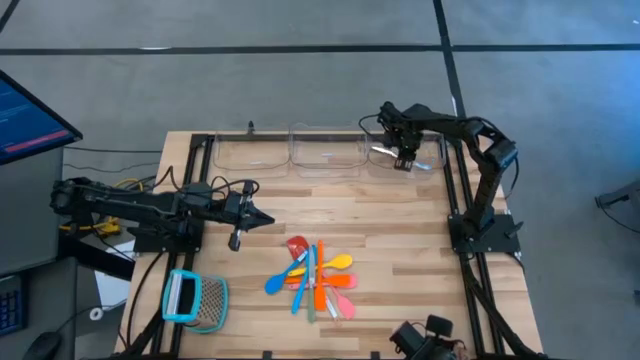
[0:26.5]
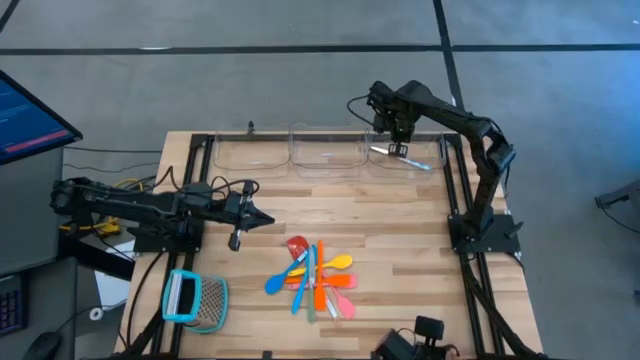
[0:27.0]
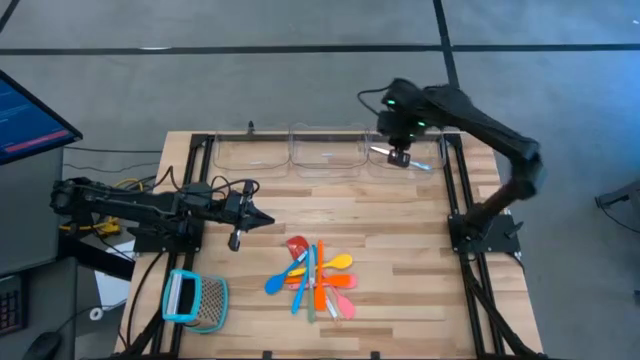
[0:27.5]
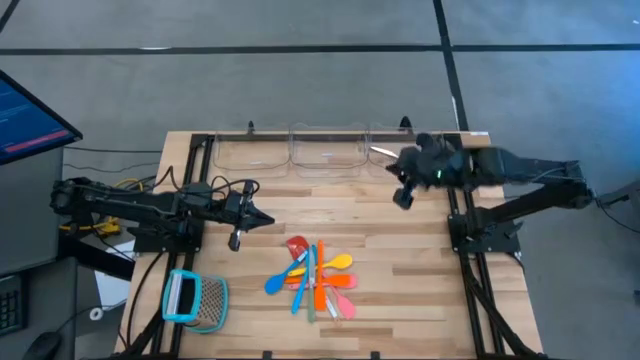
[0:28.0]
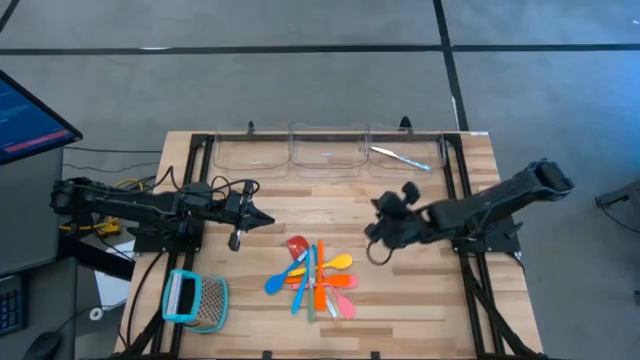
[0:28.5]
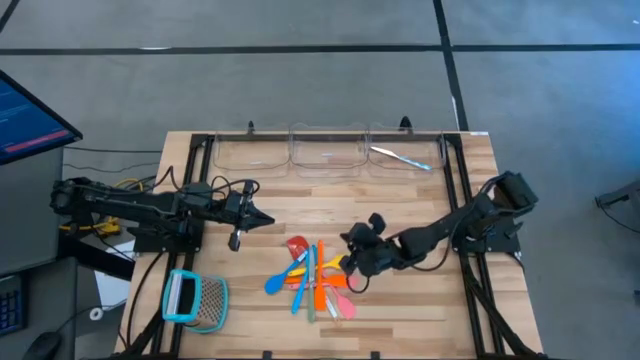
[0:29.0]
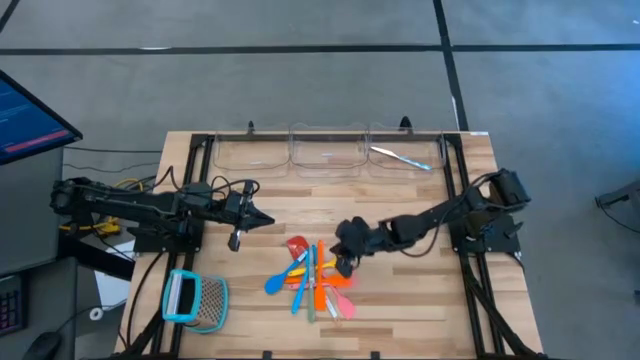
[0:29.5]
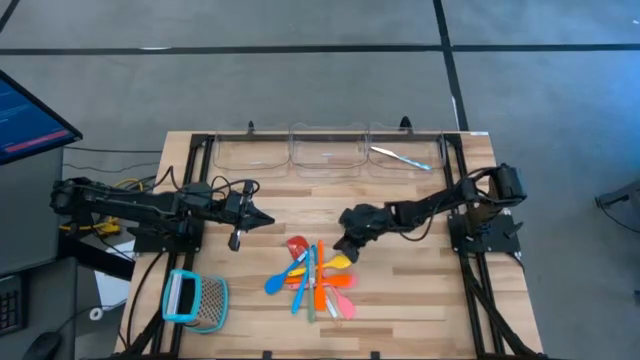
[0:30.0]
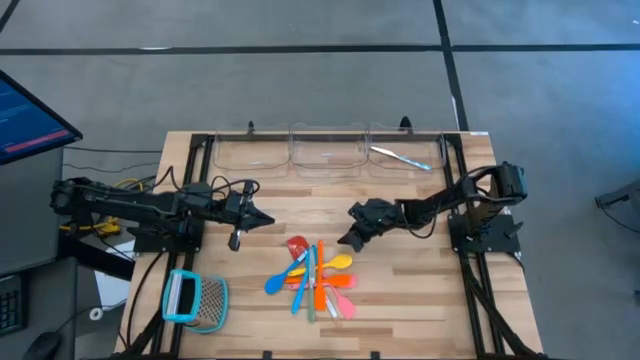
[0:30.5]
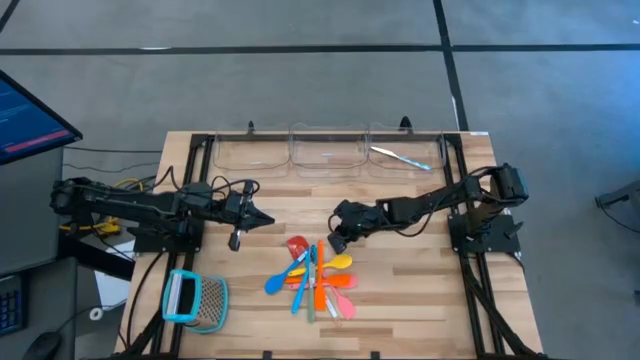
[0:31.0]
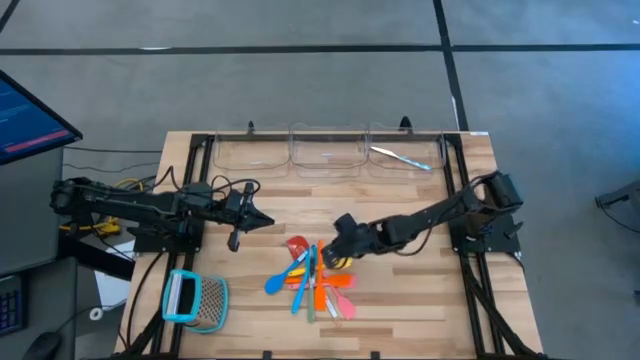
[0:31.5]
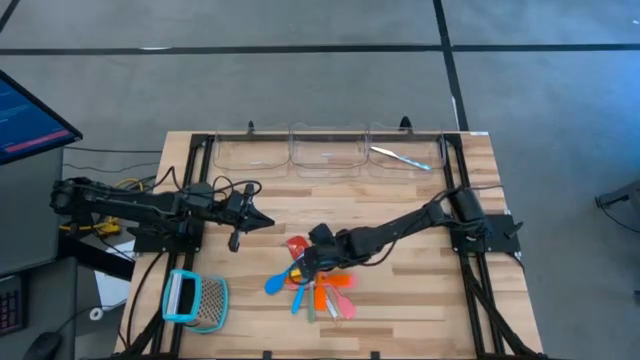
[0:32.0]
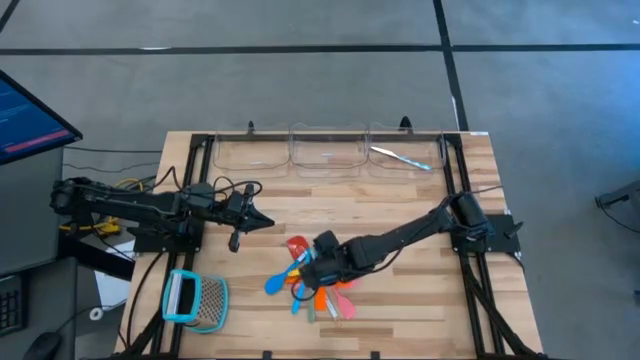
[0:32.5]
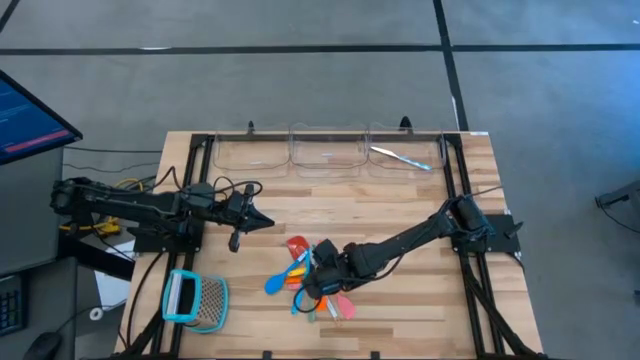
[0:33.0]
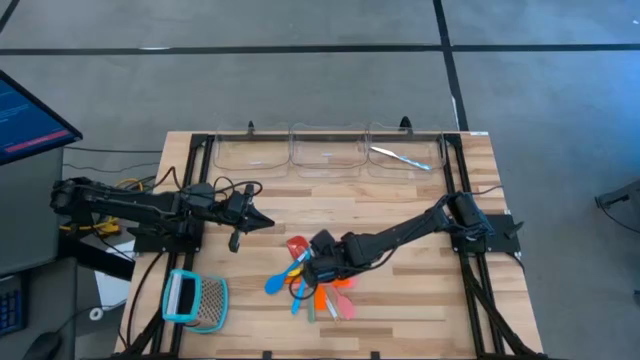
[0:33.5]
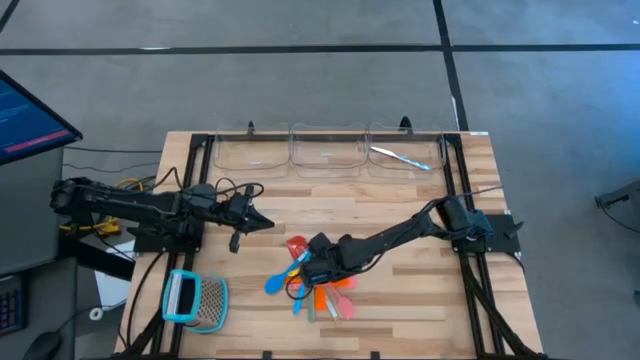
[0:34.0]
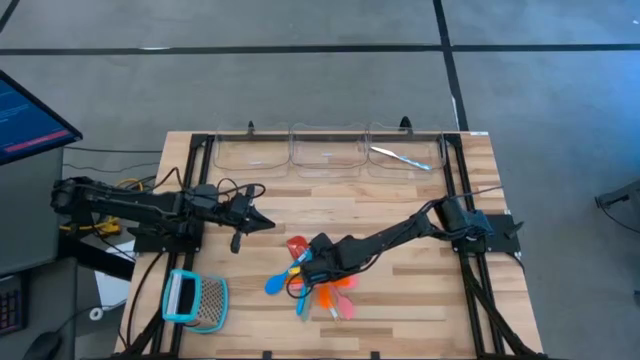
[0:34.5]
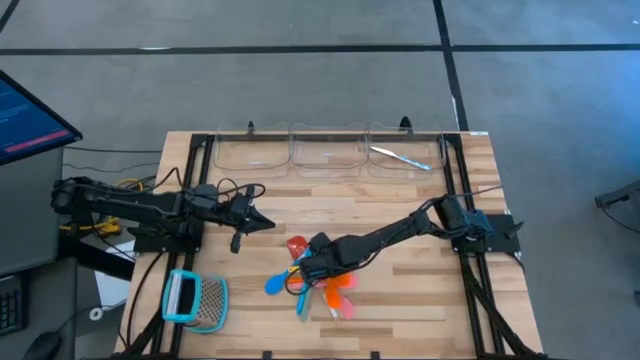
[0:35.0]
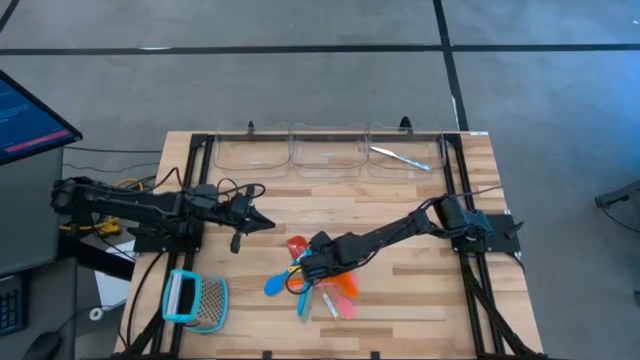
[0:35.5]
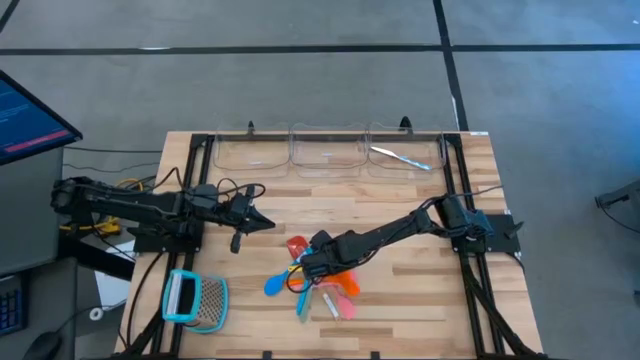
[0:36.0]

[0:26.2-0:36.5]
Task: Pick & Place Kitchen Items
Put the right orange spatula into the middle transparent bin

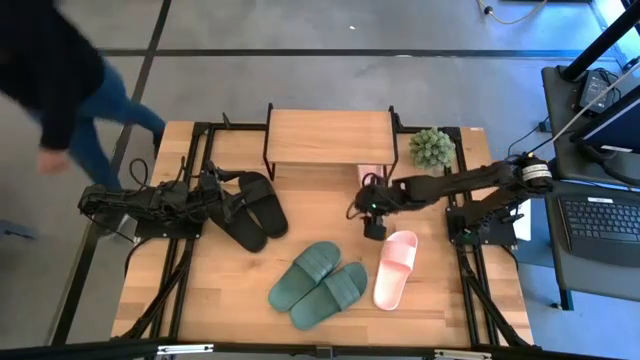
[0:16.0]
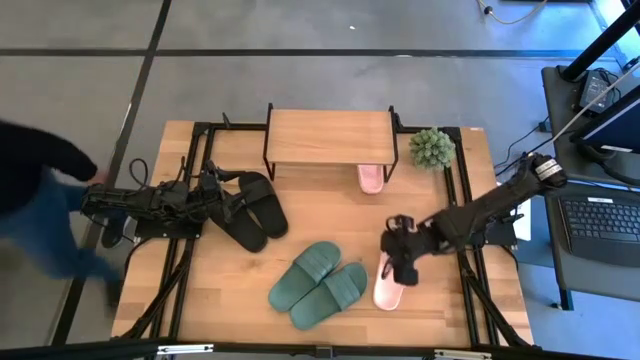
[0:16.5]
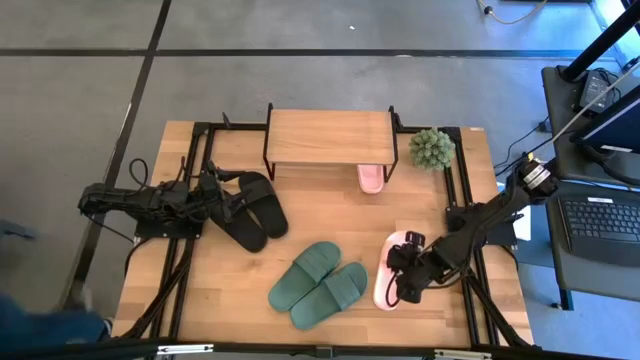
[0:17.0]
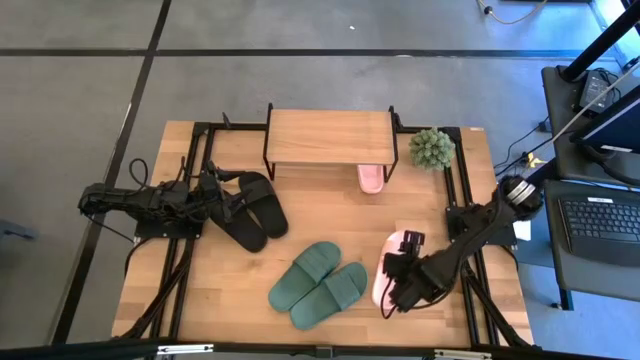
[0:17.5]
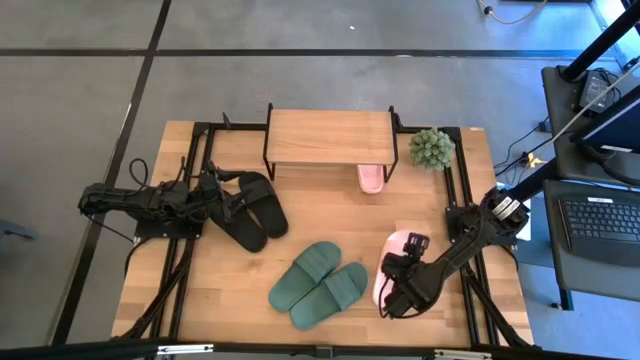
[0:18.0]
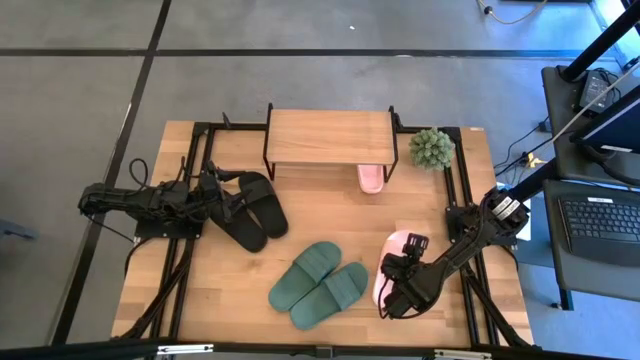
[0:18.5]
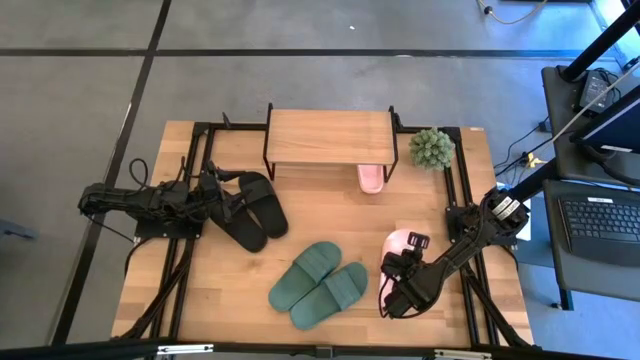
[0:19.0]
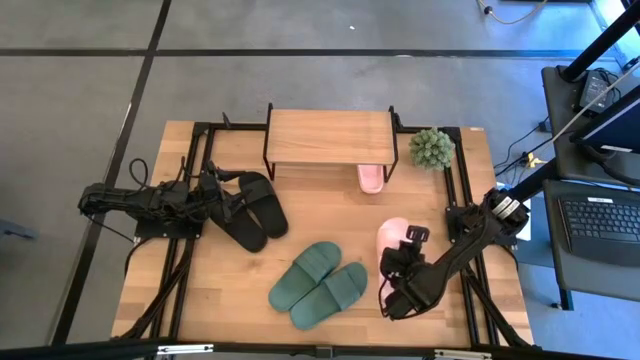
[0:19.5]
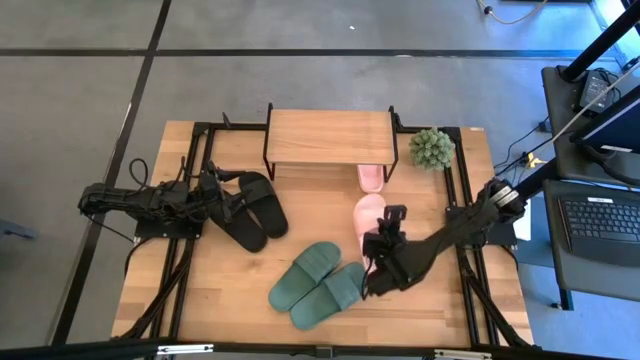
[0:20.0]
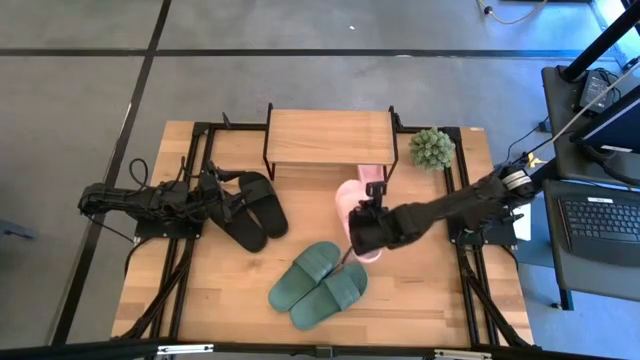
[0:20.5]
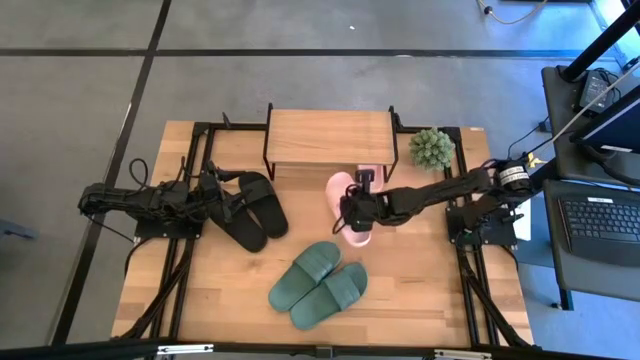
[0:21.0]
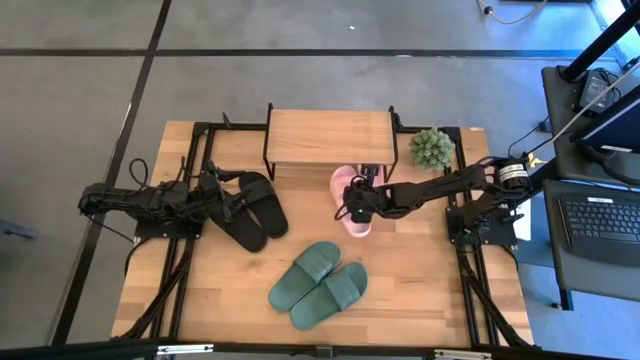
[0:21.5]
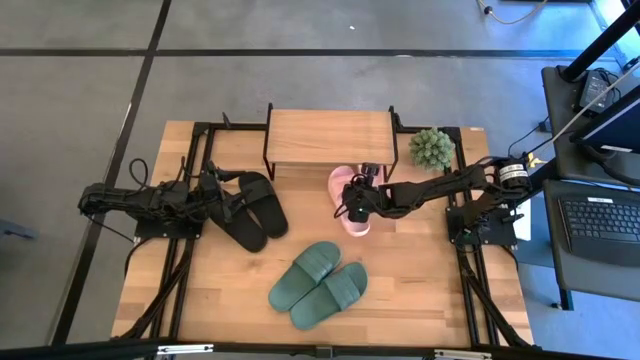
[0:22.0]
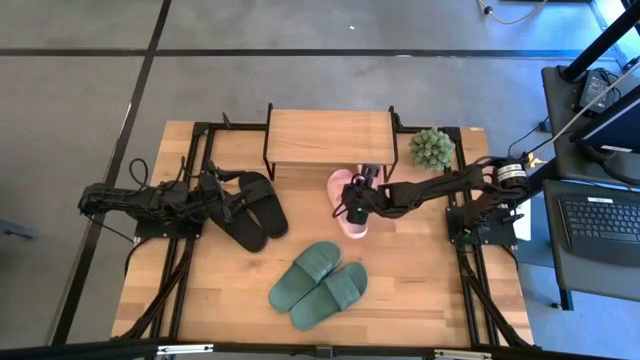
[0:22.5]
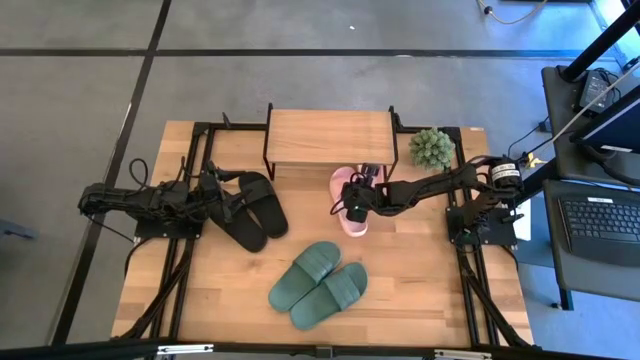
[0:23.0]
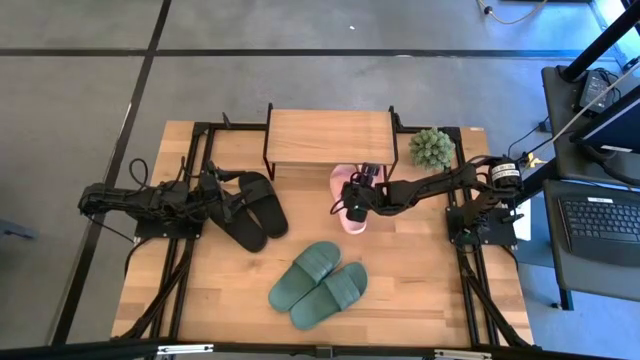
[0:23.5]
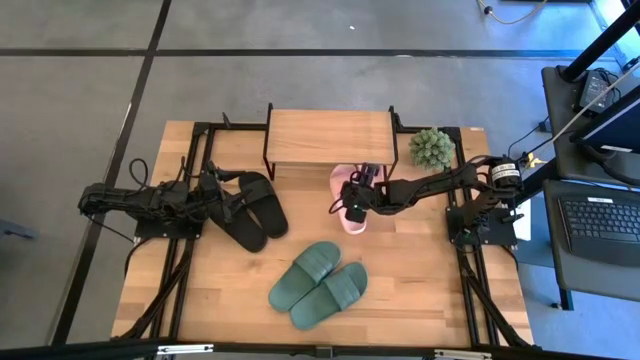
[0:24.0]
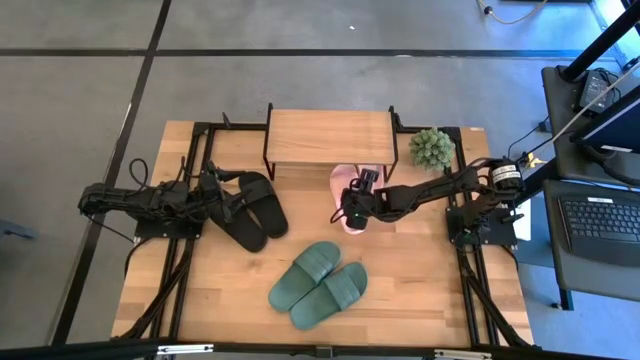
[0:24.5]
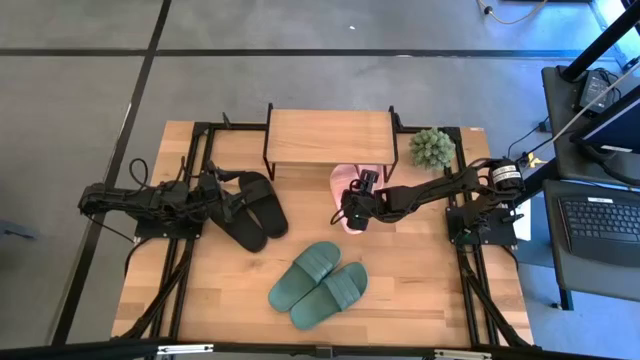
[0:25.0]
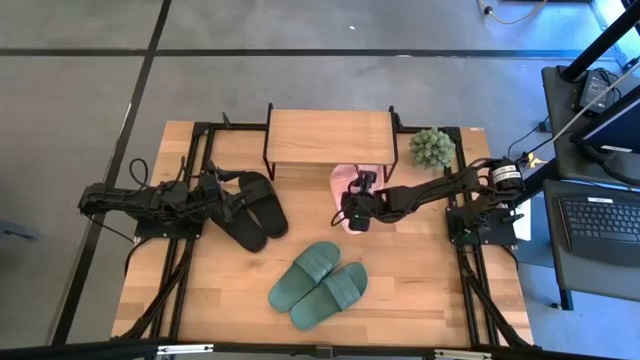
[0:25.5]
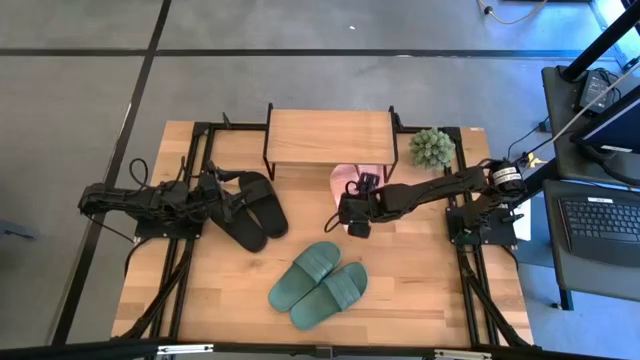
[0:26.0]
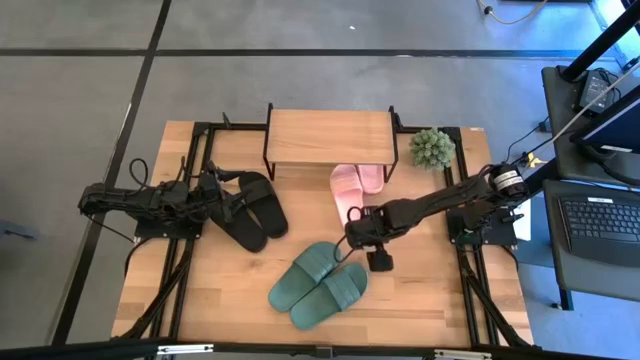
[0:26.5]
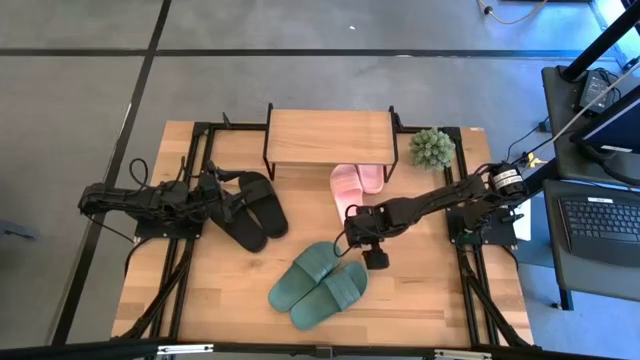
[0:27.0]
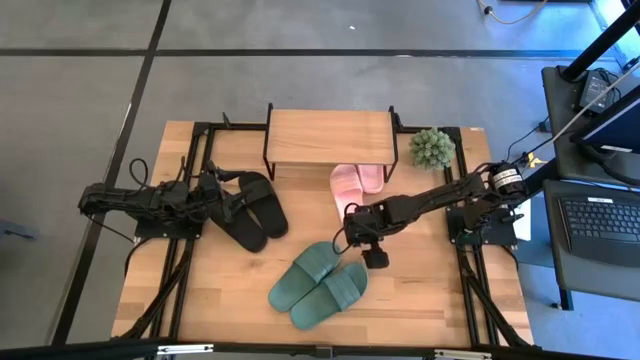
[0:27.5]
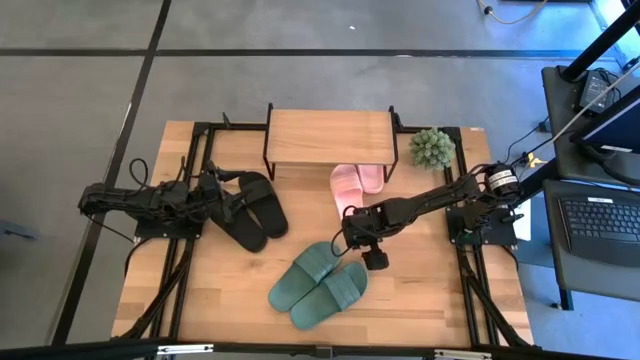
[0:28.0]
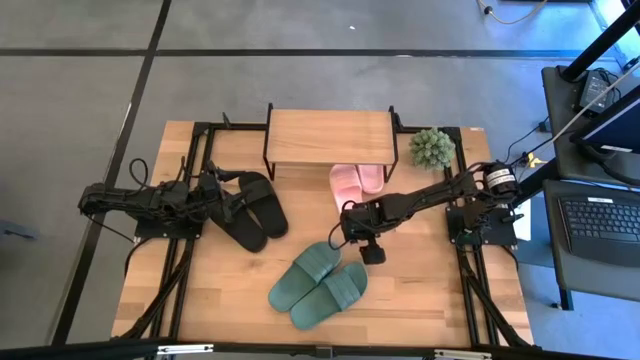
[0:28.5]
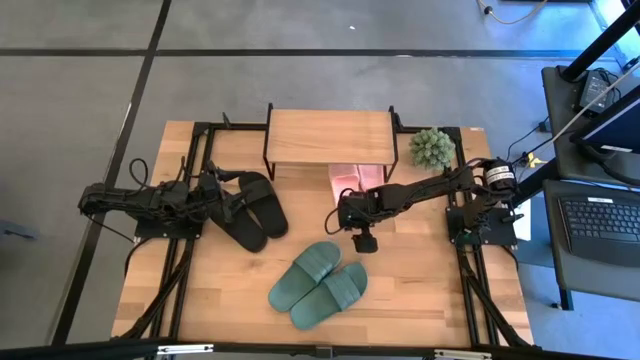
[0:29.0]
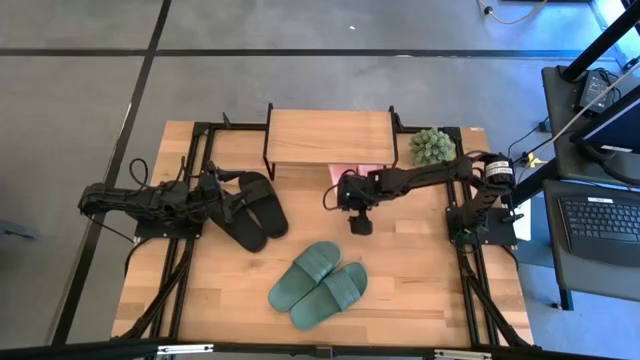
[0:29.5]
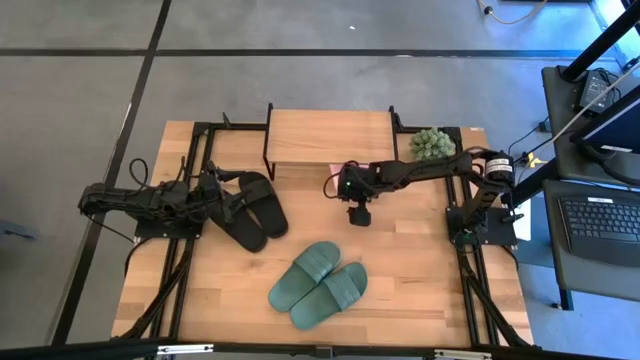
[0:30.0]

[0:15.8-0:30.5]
Task: Pick and place slides into the shelf
Put the pink slide under the shelf
